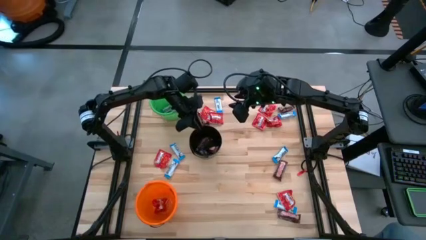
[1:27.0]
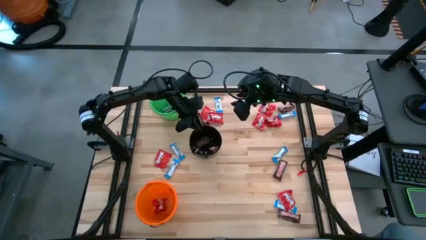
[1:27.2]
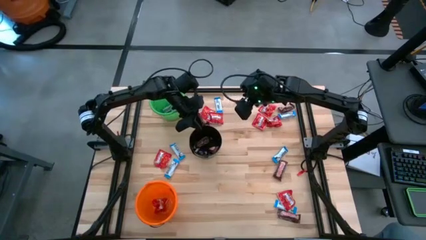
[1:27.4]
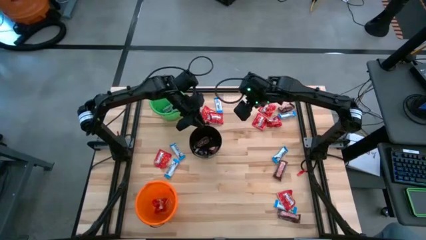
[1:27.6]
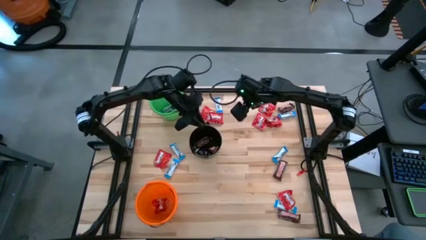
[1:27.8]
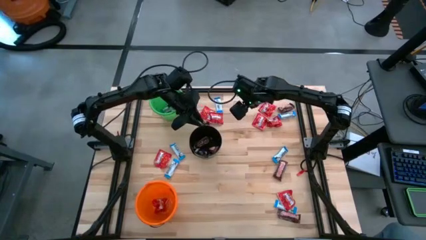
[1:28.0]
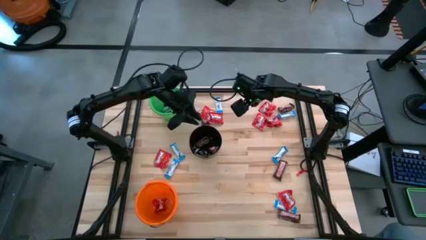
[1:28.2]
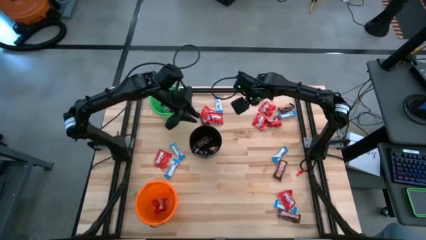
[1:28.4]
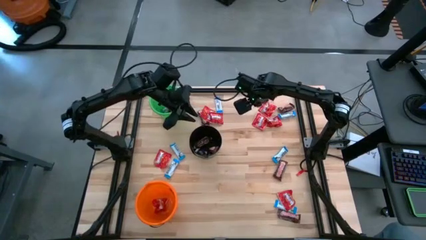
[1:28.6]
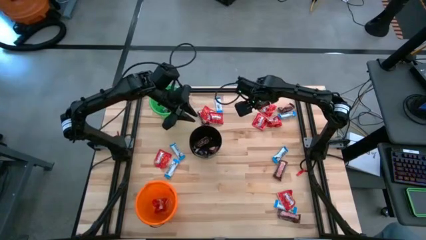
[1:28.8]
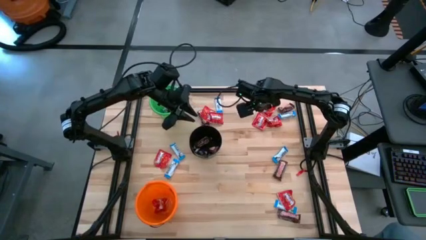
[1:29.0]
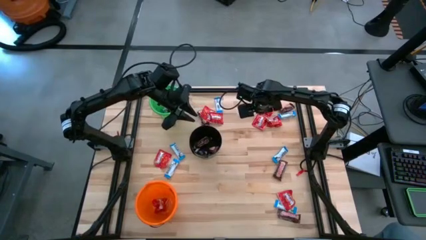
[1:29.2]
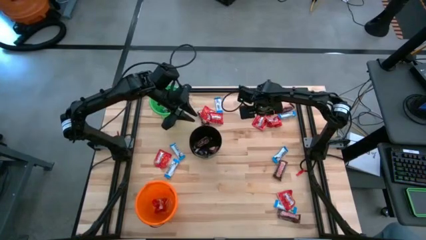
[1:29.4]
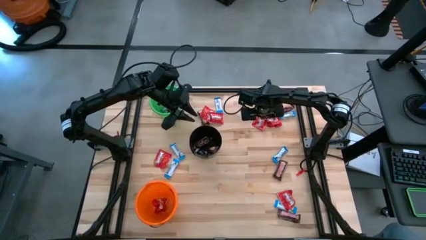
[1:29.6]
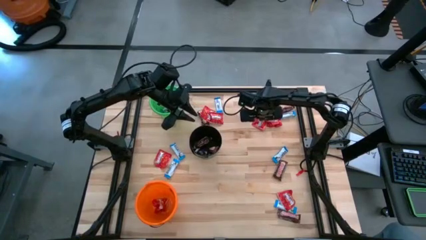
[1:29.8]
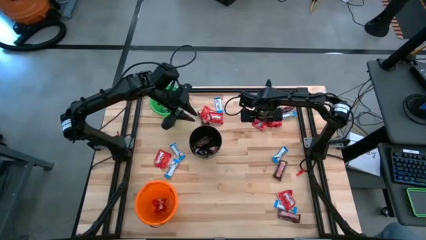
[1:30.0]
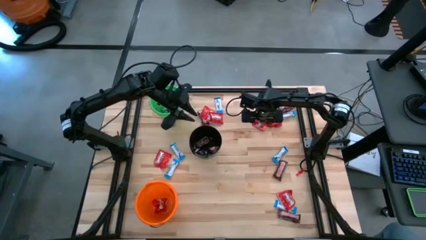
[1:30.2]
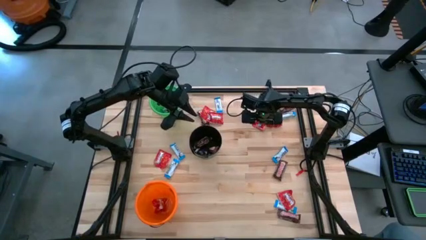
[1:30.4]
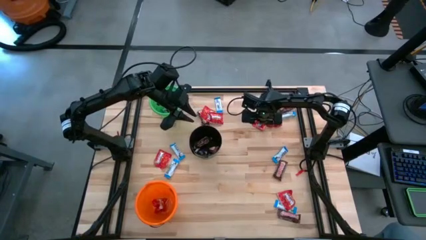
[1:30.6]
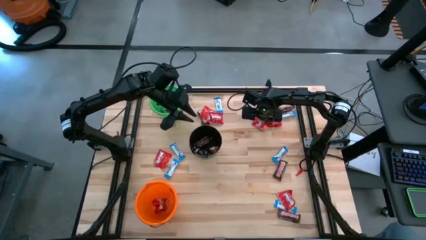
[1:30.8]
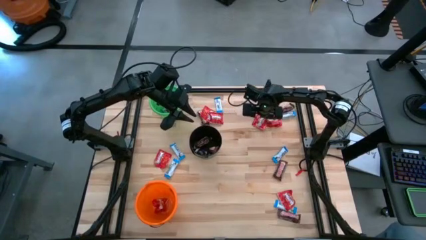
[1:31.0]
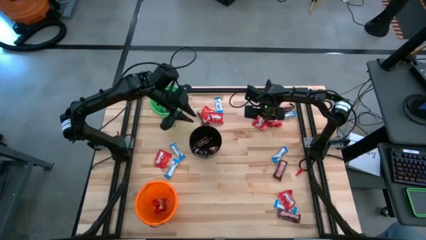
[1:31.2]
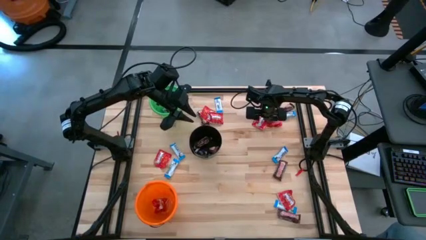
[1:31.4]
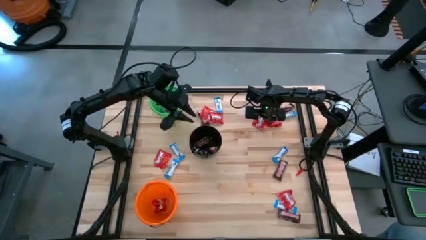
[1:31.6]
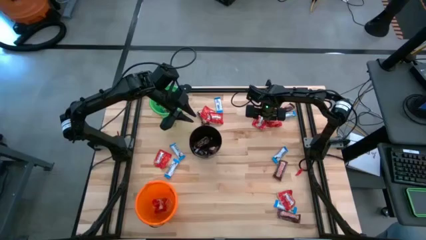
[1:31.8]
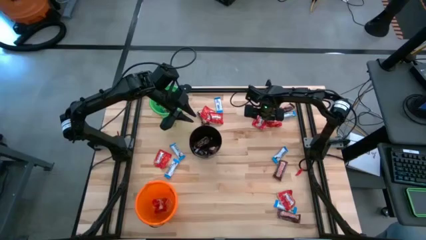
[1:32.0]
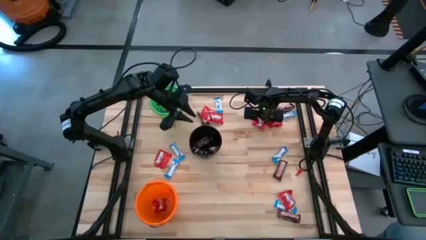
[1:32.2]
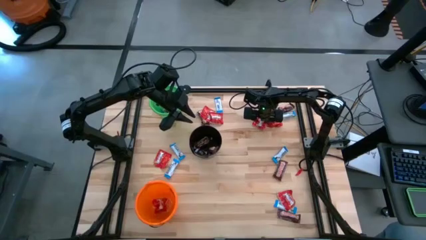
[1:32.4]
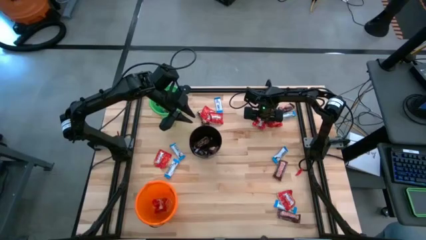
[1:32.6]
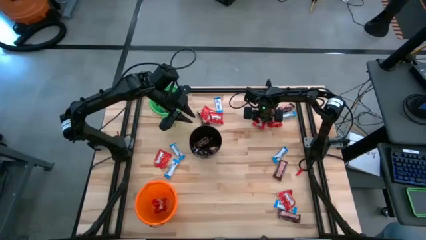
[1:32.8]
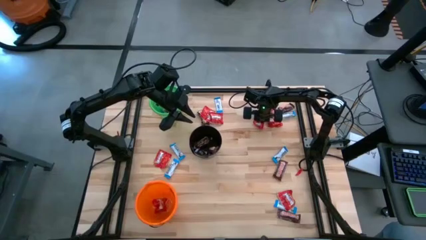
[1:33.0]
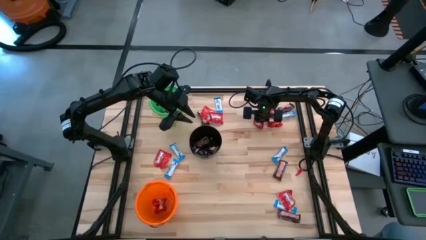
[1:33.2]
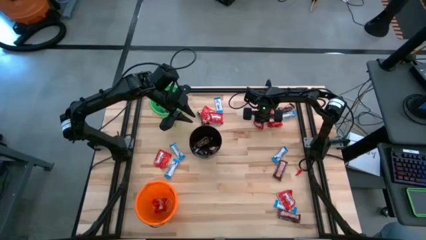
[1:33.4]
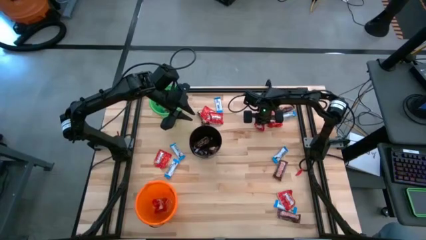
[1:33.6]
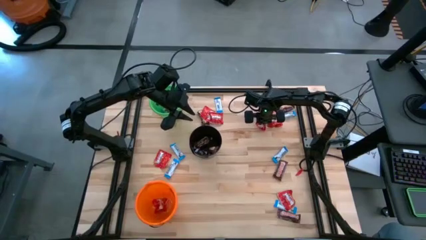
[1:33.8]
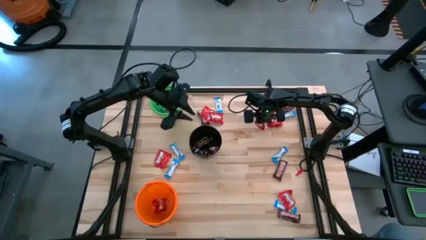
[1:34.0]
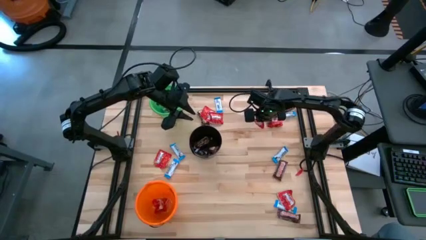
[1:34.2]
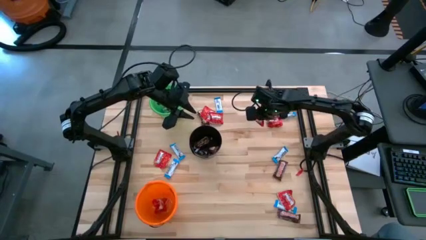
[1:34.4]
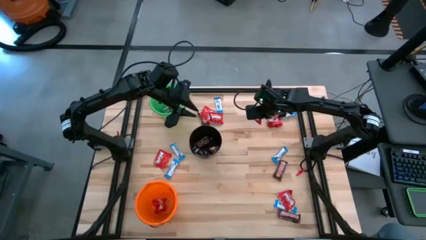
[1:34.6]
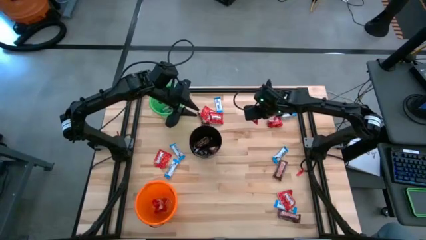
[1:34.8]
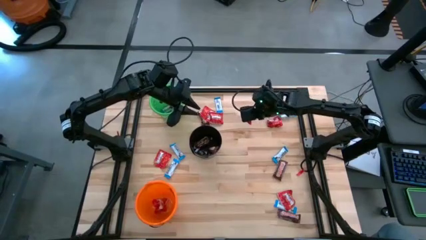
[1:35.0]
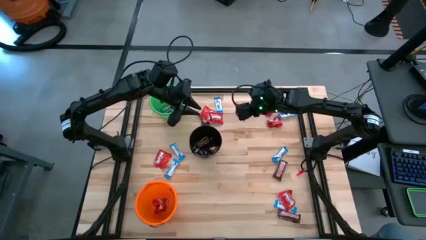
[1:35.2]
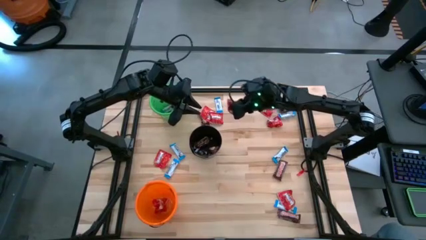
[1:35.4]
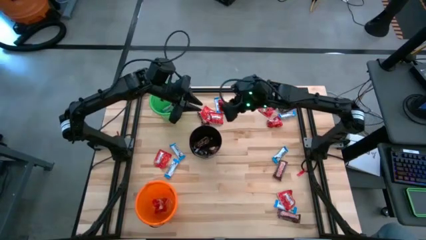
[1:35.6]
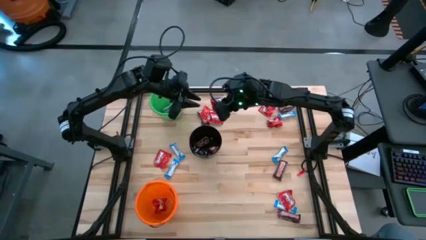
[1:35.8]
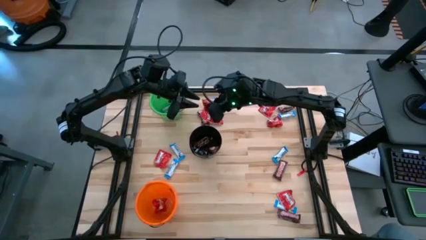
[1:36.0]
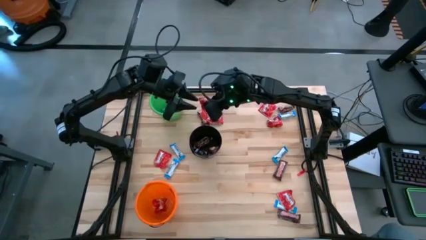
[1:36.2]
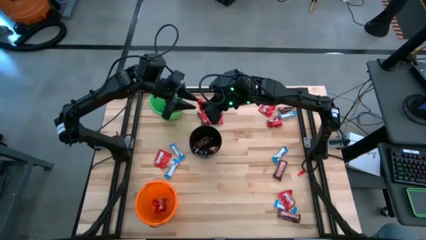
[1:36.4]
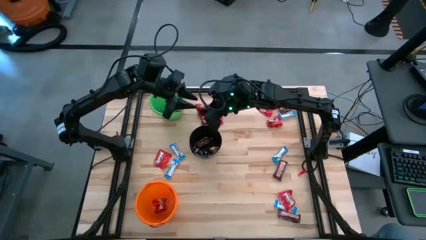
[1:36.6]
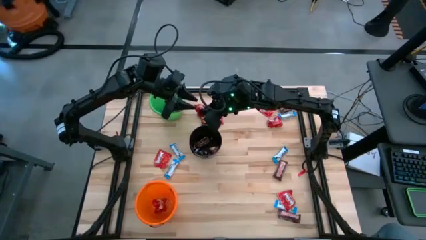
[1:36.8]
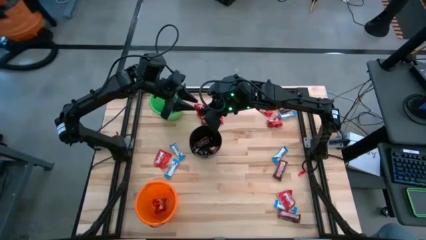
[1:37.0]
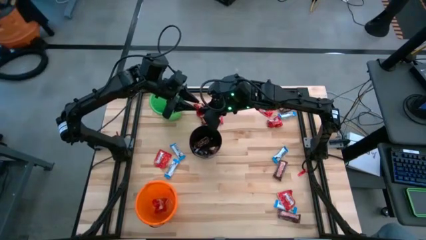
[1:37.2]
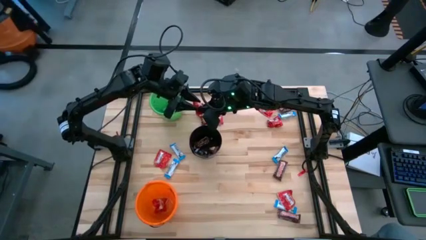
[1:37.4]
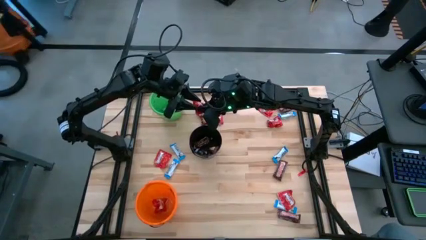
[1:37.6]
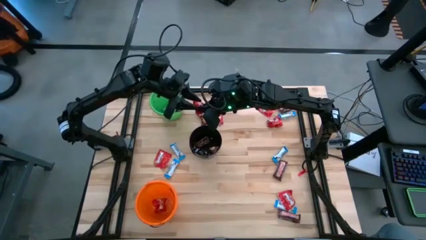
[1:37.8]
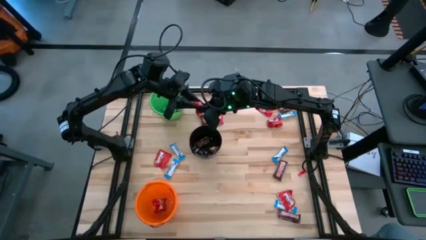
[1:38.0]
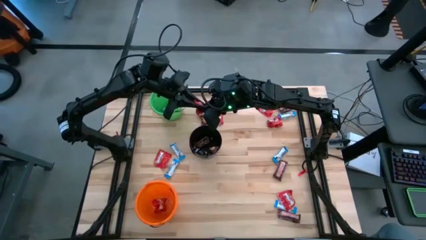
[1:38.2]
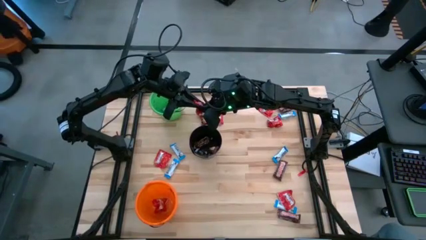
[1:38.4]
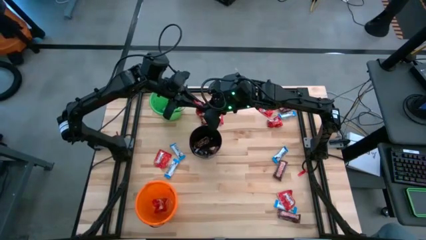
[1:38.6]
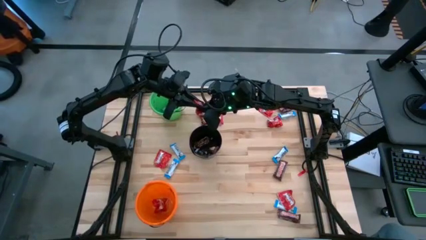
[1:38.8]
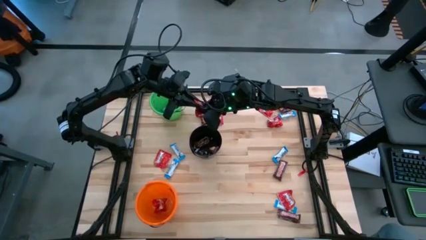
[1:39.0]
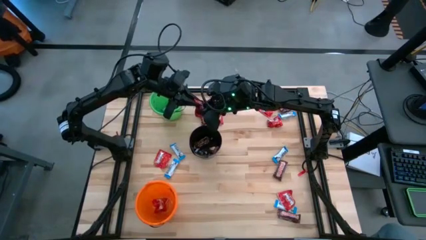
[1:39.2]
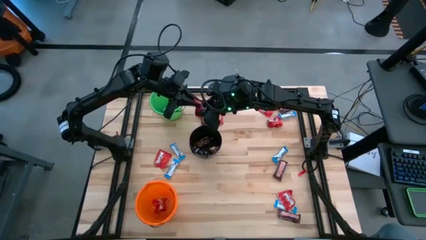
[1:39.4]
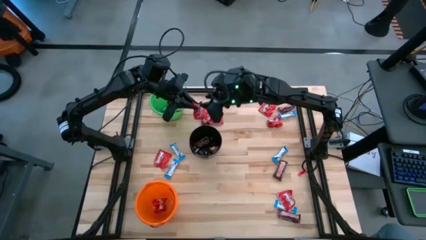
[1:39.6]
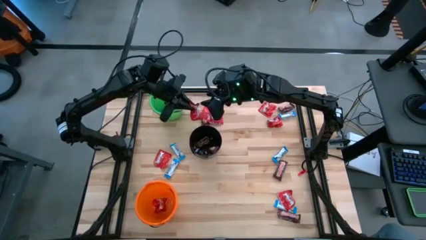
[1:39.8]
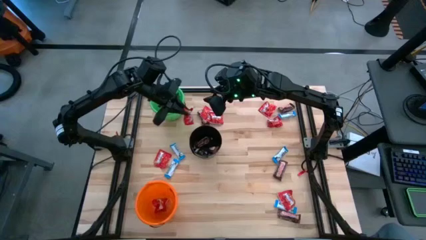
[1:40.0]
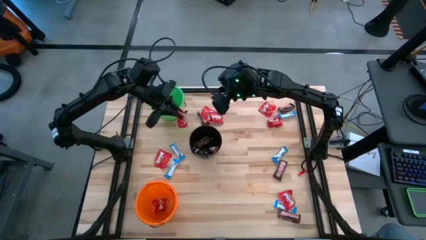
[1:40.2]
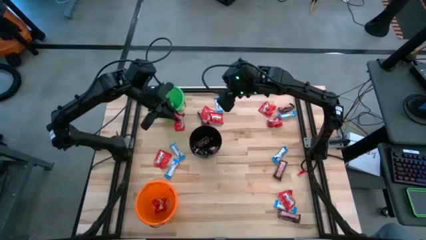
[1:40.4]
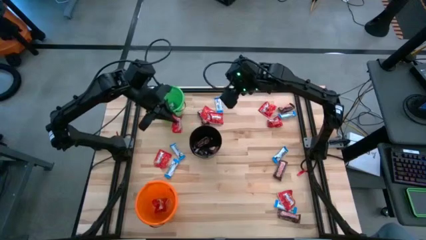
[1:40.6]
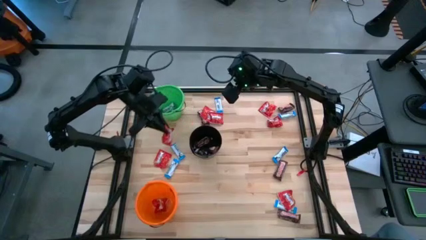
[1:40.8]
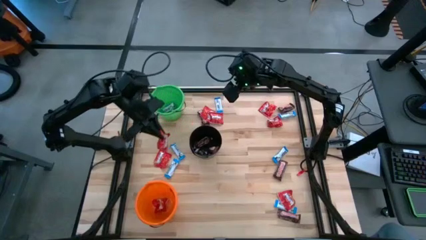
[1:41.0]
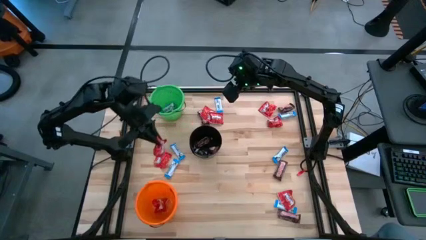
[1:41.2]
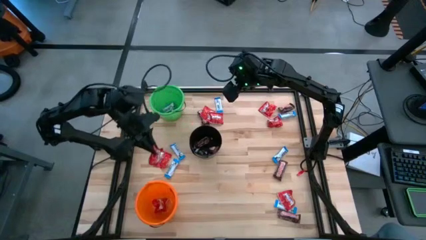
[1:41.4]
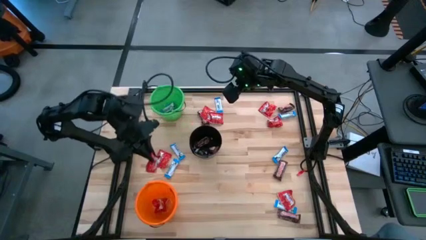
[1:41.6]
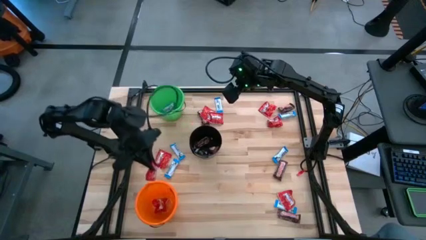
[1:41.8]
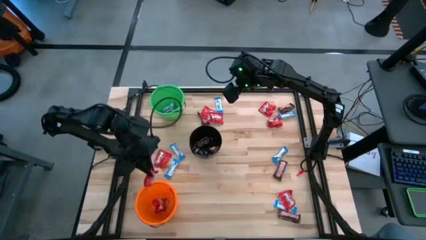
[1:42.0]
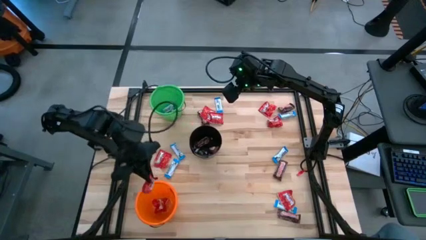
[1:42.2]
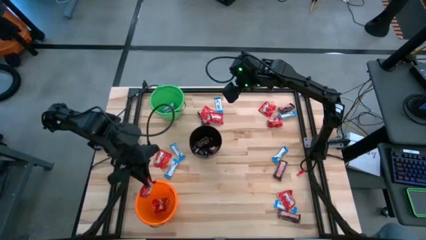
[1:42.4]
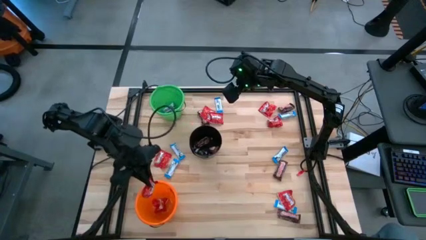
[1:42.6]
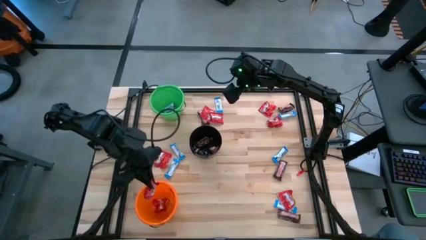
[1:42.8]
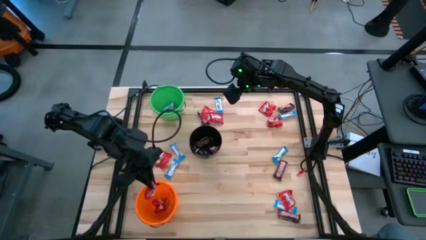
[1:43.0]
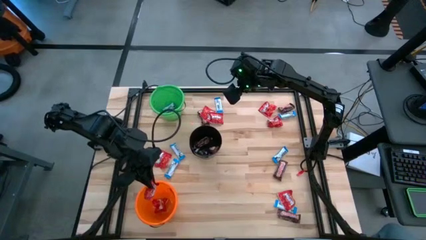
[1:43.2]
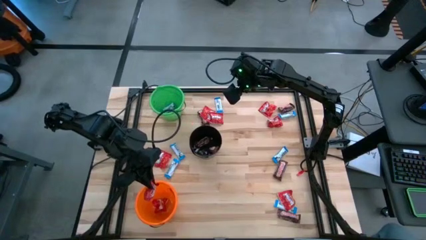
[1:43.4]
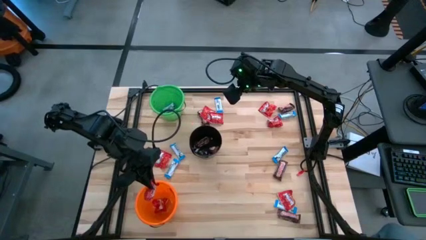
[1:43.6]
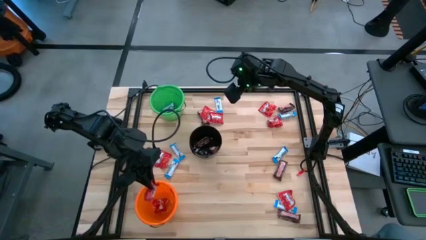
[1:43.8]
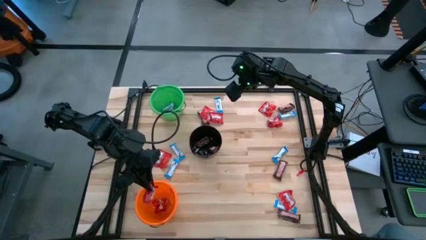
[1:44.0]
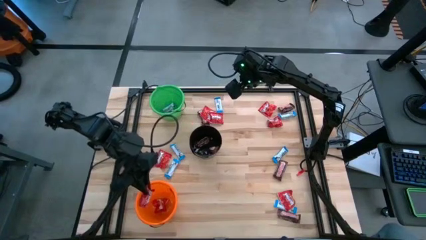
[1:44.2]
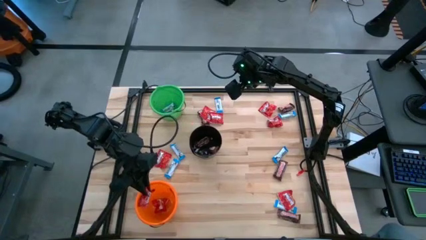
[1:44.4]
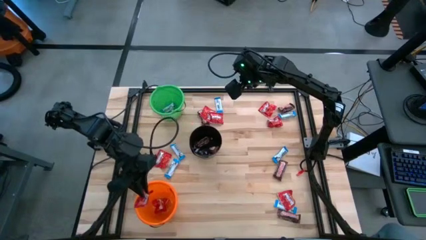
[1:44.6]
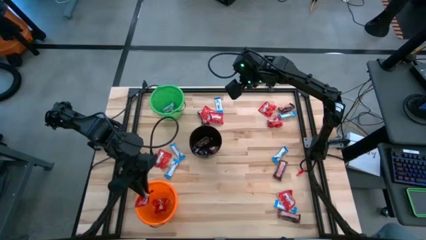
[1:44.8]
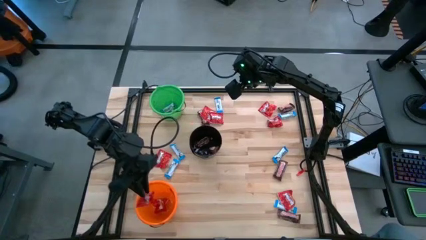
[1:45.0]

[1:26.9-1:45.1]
Task: Sort candy
Put the red candy pack into the orange bucket
